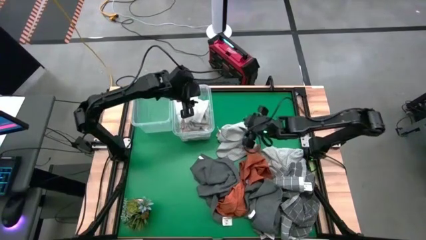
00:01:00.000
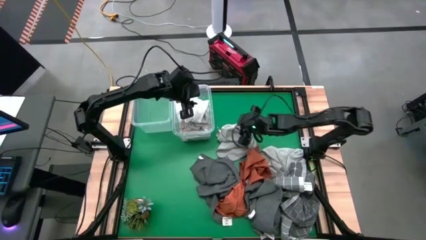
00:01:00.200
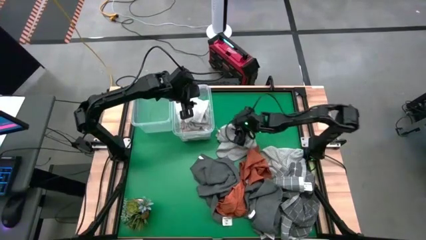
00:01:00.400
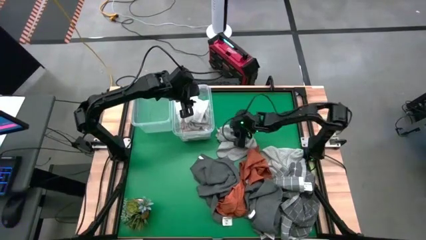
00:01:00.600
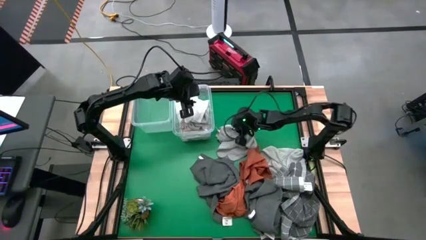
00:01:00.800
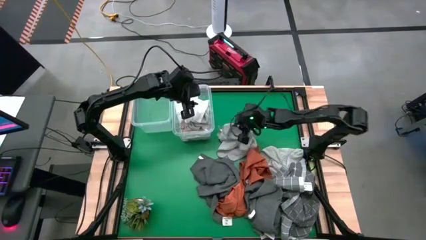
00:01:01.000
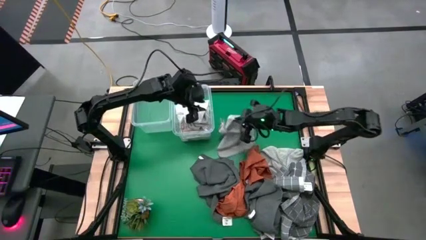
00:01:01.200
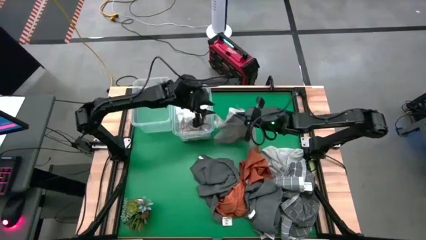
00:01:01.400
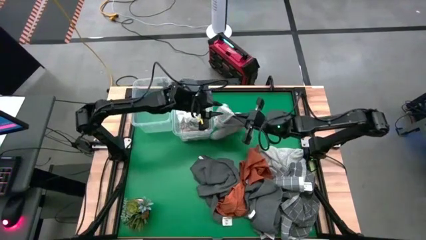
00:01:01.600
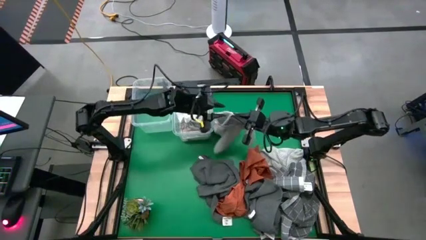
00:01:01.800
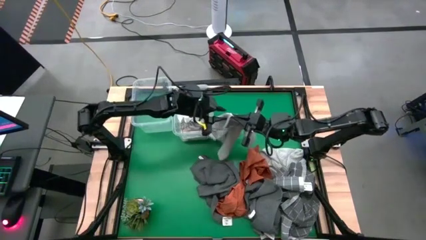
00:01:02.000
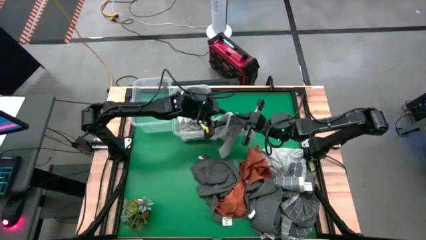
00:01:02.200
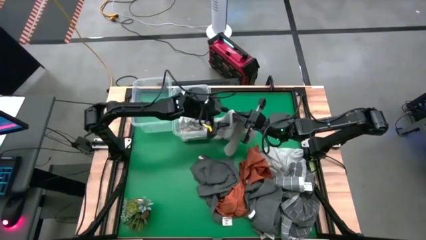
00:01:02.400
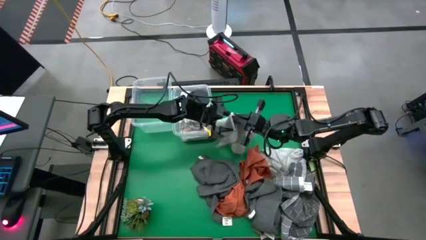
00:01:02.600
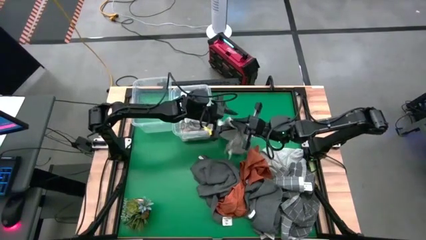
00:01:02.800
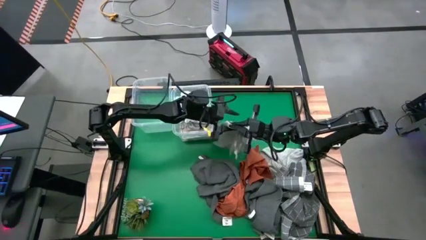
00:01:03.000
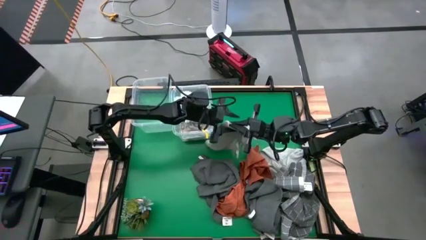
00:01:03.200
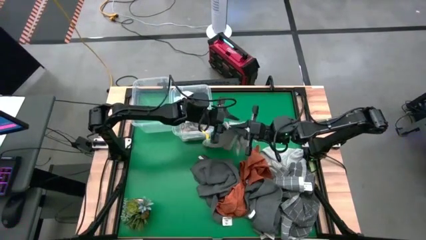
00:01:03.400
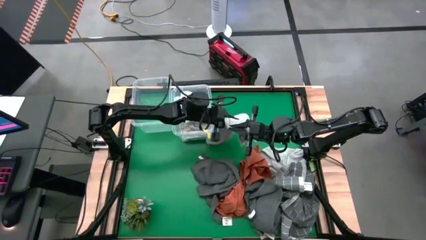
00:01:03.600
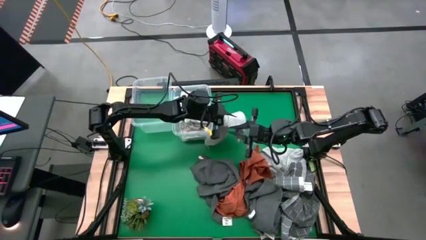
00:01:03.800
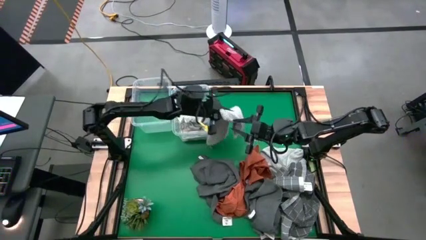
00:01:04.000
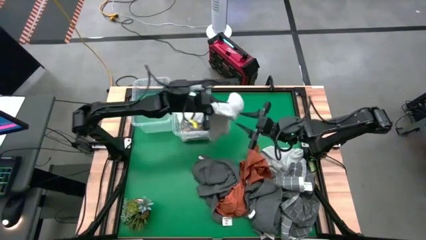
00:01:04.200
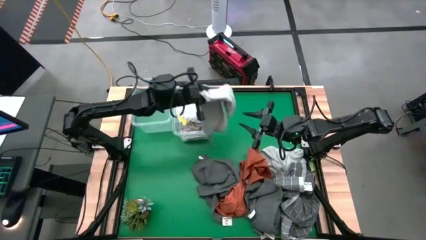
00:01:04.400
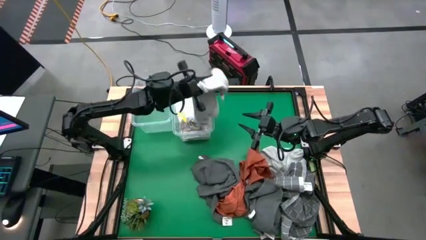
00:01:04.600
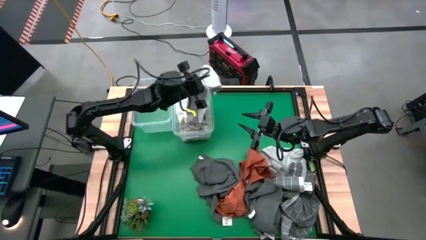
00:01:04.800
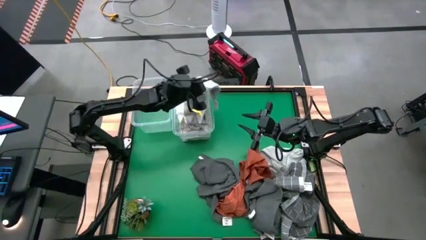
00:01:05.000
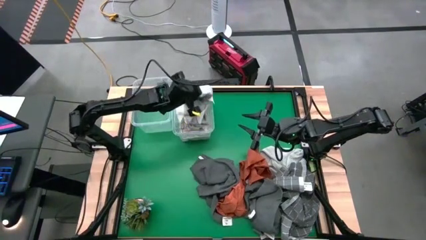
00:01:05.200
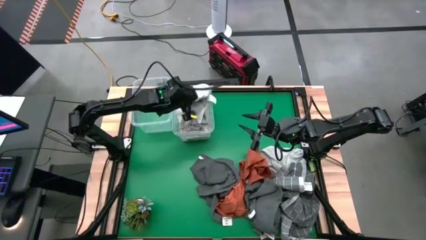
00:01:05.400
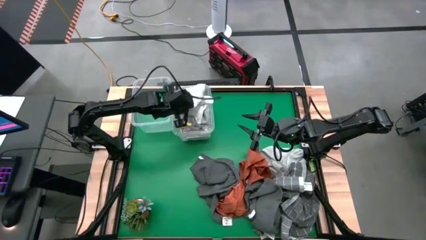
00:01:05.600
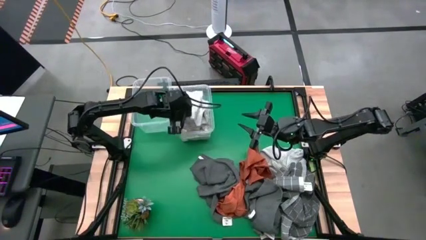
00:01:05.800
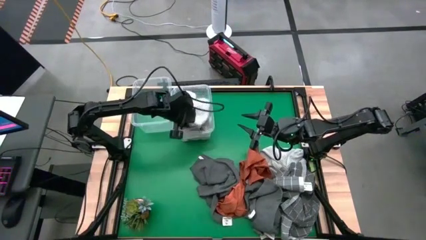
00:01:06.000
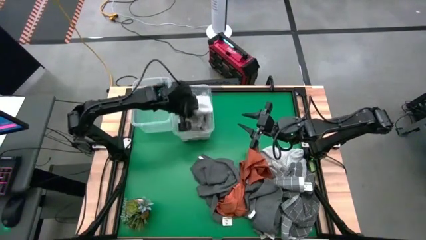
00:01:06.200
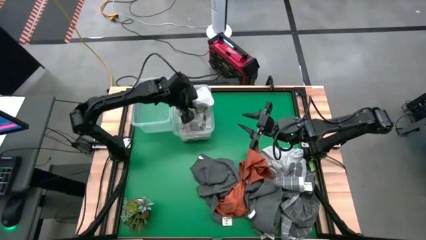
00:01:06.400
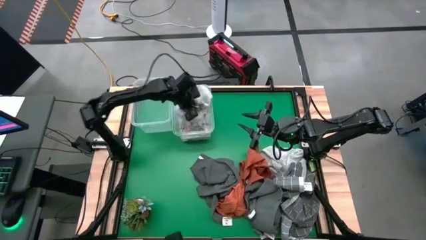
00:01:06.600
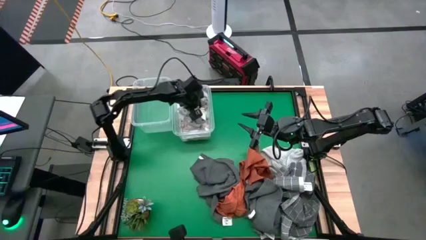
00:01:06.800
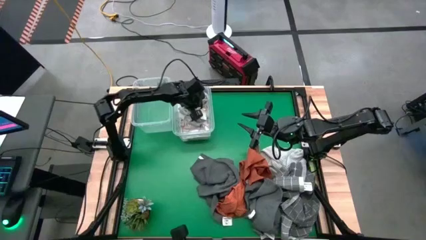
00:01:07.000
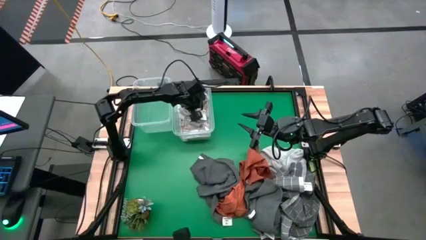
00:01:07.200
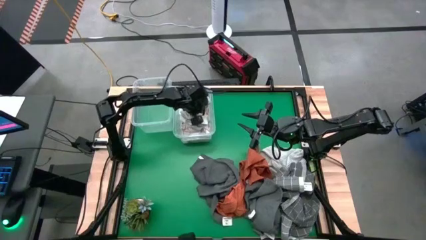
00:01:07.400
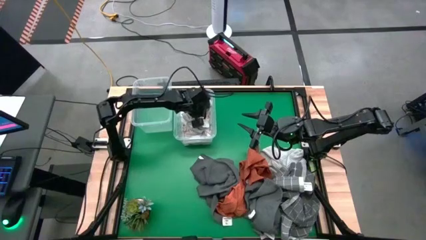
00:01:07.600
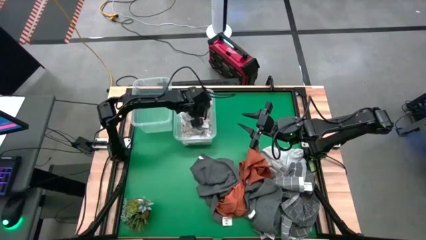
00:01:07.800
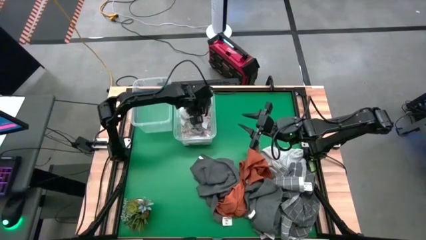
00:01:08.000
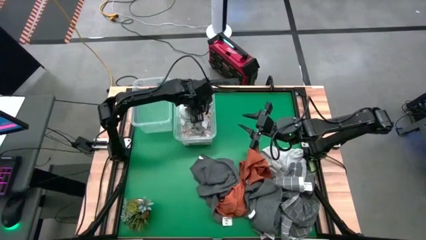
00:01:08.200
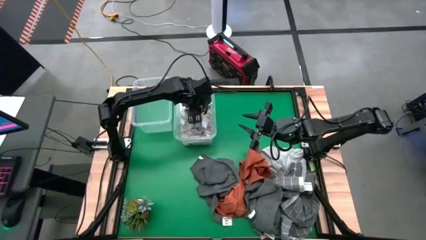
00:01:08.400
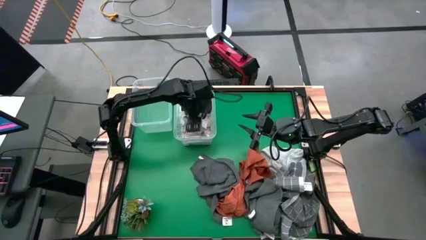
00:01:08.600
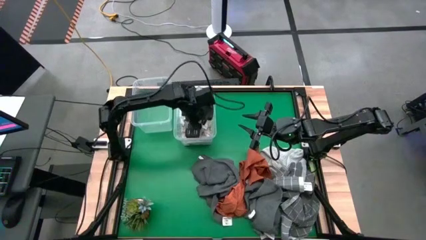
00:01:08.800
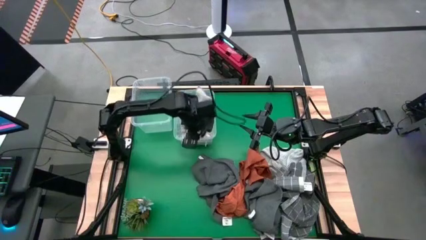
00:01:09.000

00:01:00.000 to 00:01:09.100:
Task: Sort towels by color in basket
Put the light gray towel into the right transparent bin

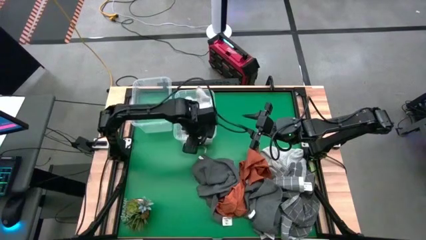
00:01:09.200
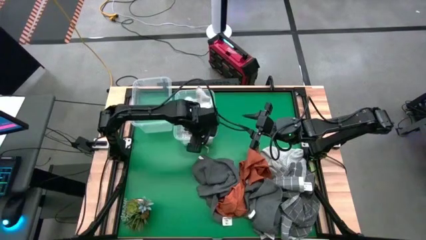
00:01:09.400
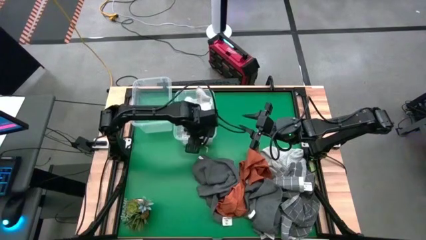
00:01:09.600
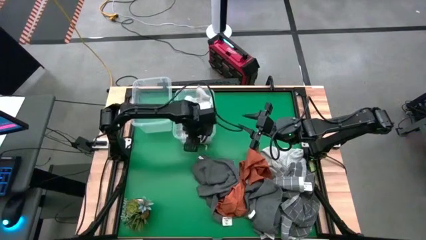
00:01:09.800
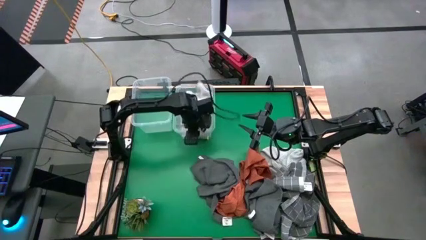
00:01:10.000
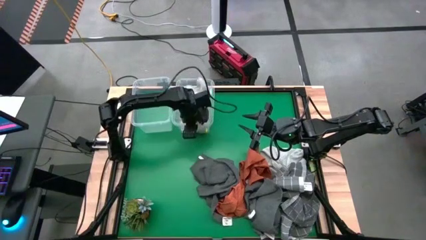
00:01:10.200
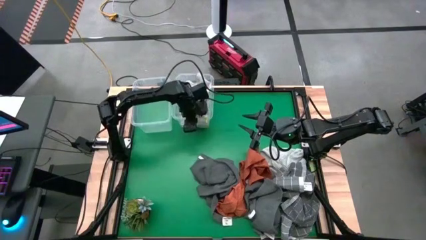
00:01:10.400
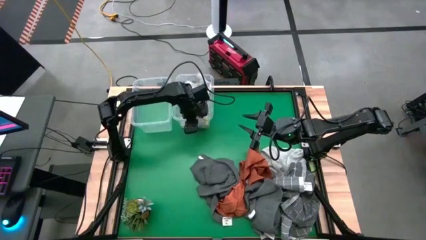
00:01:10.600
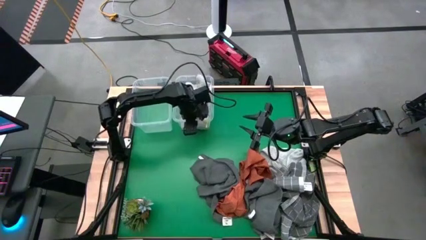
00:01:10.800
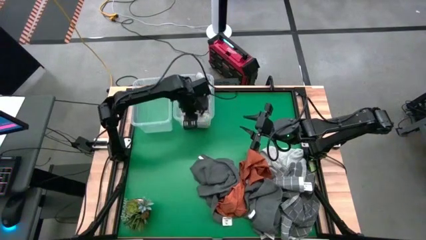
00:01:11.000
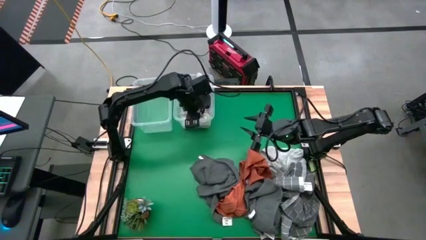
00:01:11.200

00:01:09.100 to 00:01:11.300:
Adjust the right transparent bin

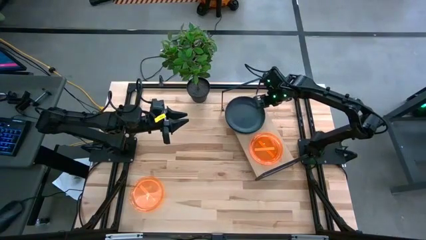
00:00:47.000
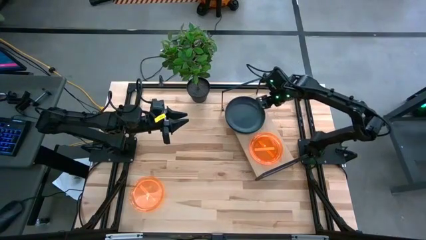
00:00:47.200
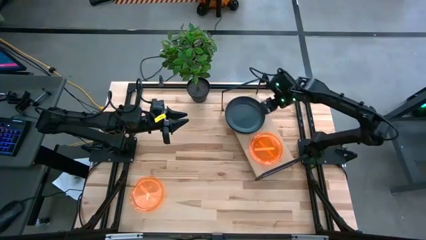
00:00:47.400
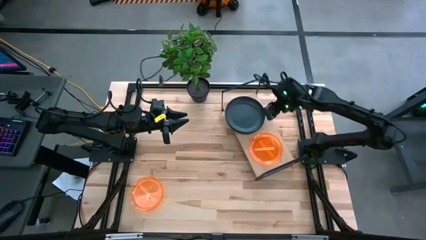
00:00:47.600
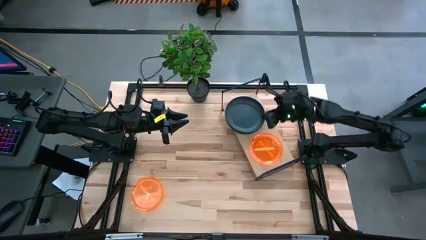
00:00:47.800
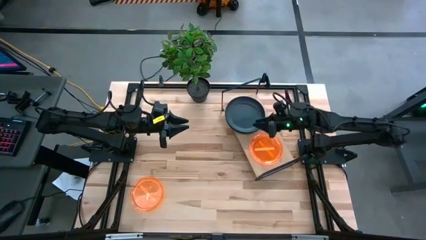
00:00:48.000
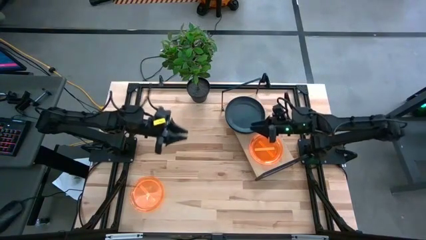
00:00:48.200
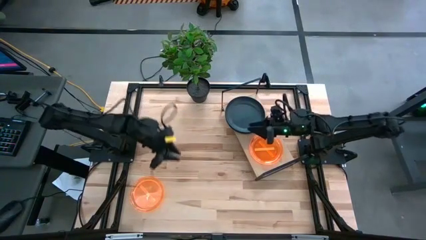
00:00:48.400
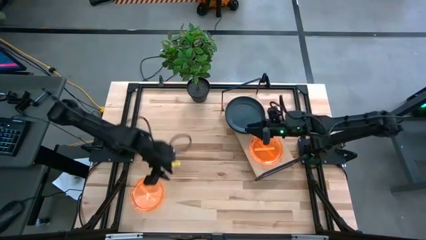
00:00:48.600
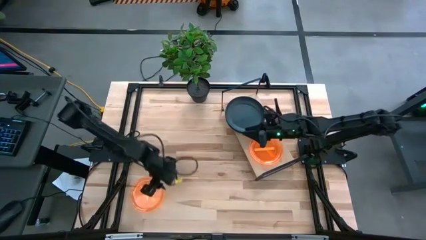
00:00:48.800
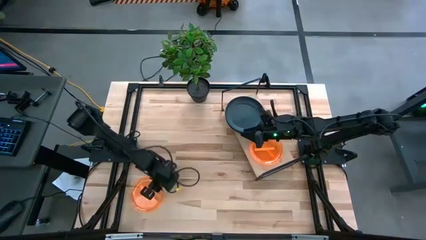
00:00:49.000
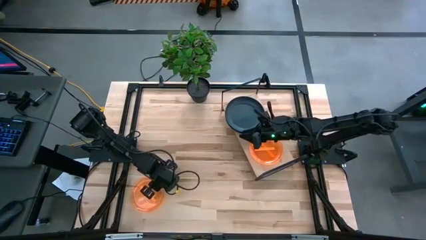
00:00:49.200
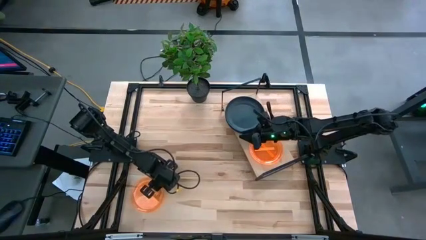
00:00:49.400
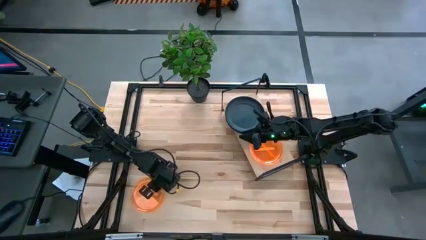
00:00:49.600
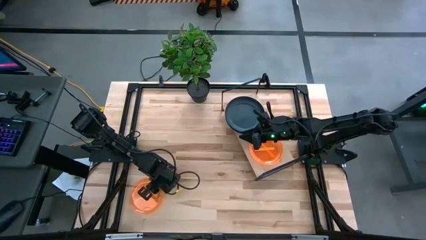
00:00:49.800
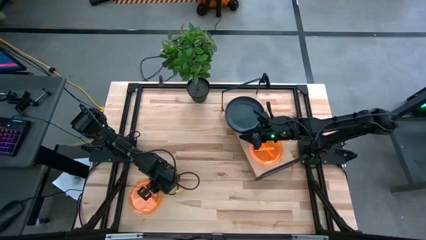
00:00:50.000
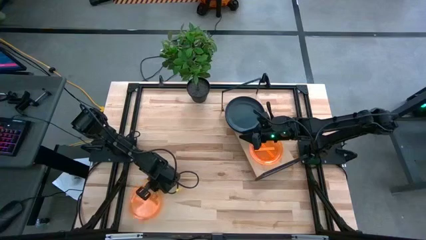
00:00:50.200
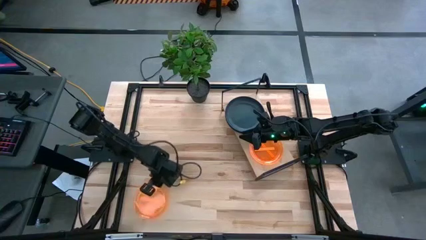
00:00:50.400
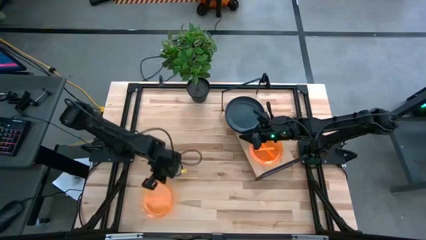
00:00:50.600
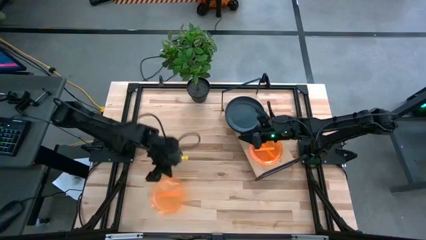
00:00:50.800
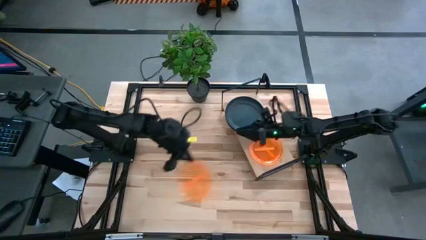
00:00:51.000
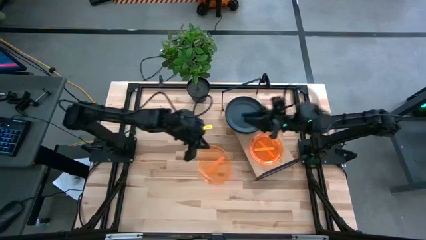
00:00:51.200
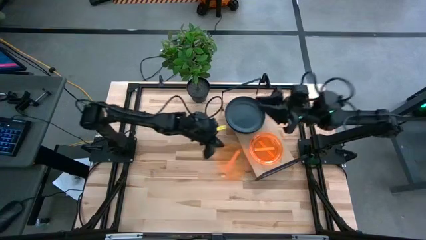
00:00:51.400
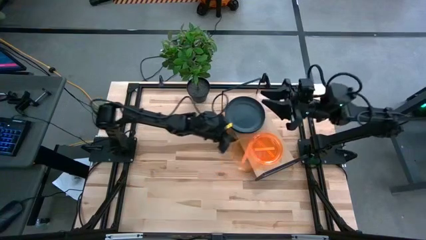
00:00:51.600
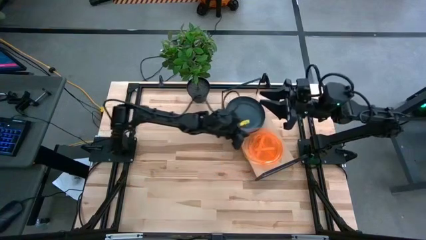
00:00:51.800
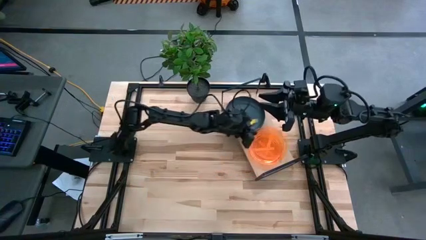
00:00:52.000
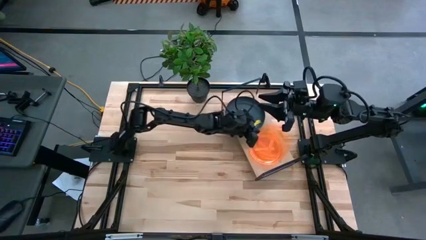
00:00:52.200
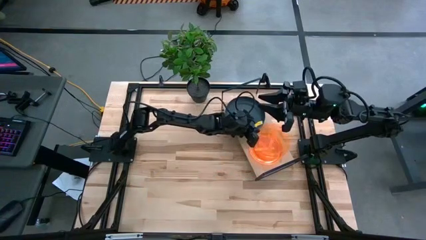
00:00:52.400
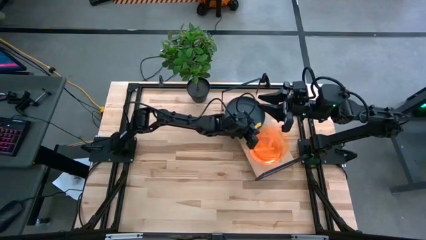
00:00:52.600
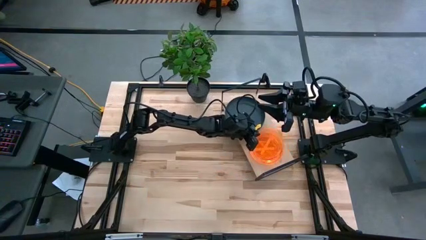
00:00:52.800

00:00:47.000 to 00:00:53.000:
Task: Place and stack plates onto a shelf
Stack the orange plate on top of the stacked orange plates on the shelf
